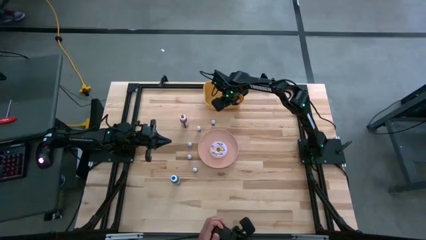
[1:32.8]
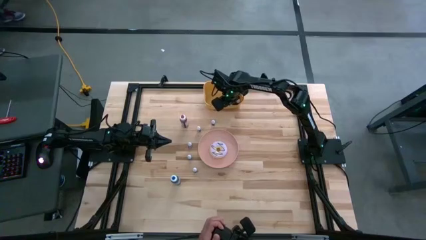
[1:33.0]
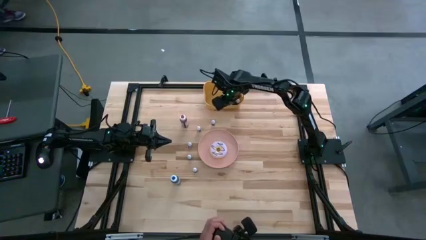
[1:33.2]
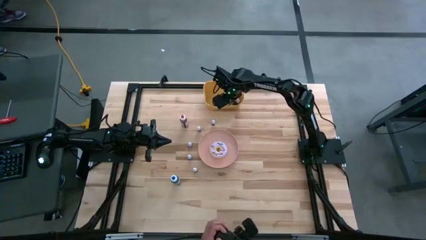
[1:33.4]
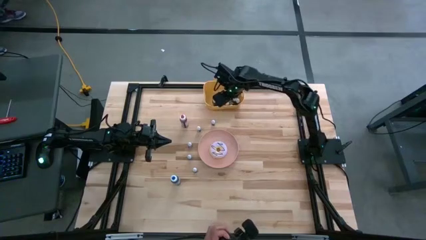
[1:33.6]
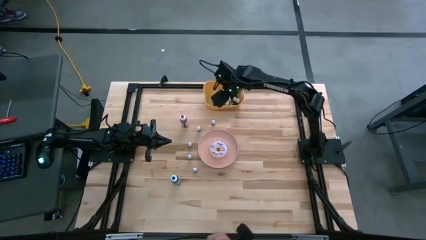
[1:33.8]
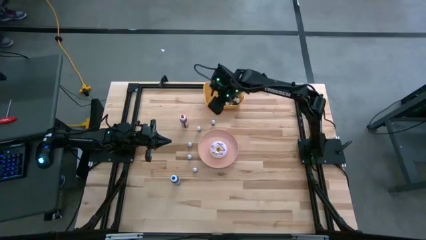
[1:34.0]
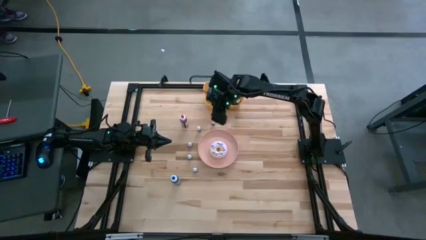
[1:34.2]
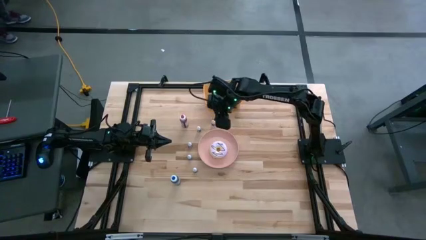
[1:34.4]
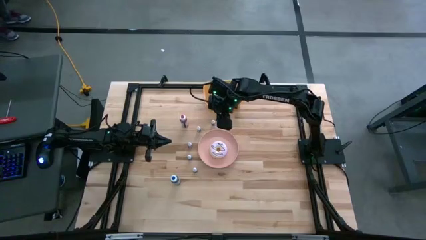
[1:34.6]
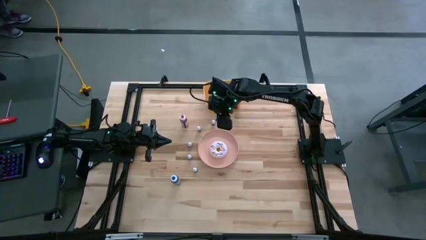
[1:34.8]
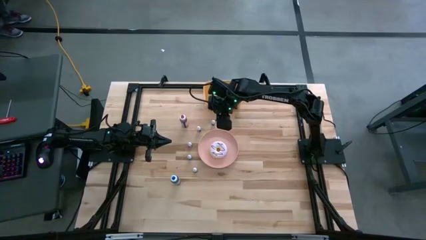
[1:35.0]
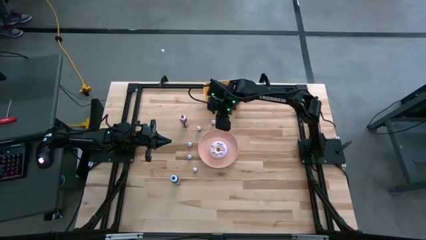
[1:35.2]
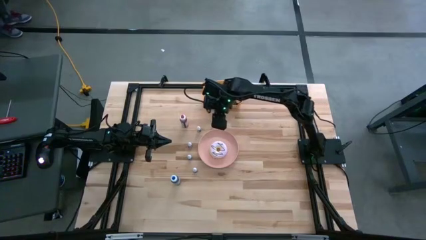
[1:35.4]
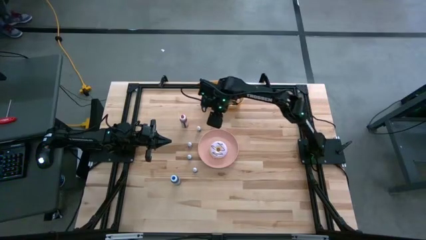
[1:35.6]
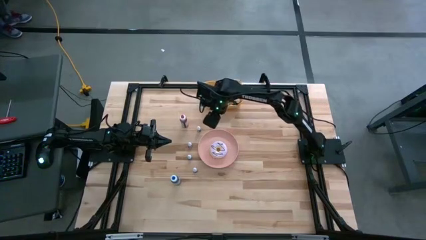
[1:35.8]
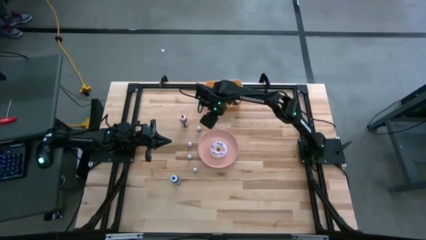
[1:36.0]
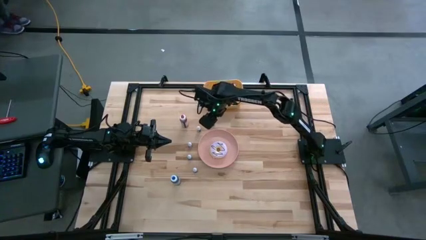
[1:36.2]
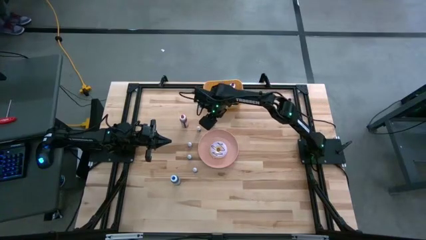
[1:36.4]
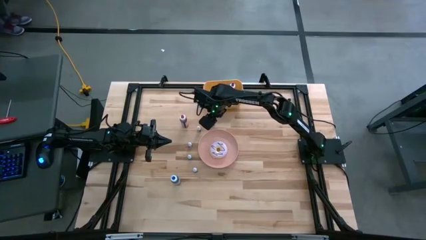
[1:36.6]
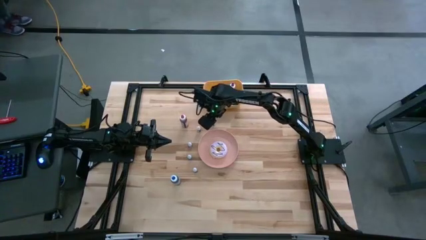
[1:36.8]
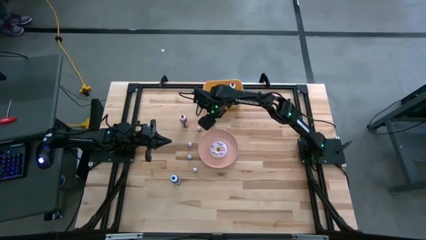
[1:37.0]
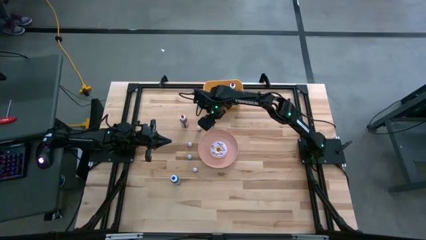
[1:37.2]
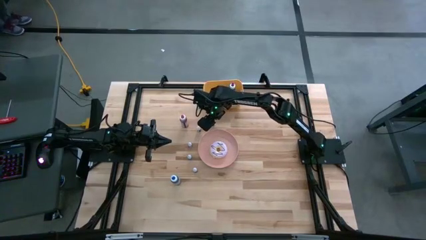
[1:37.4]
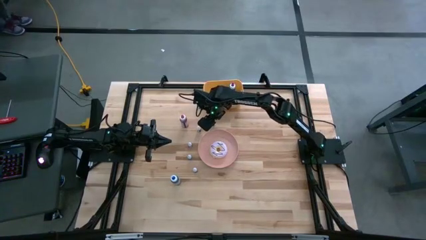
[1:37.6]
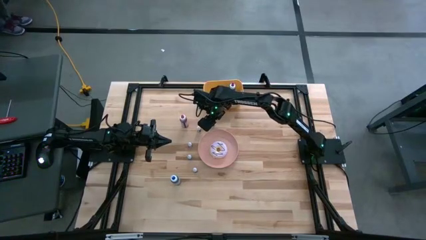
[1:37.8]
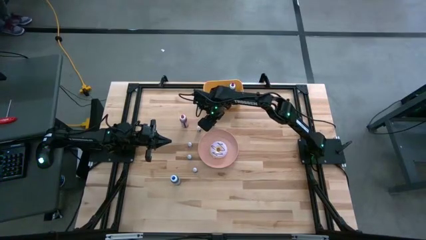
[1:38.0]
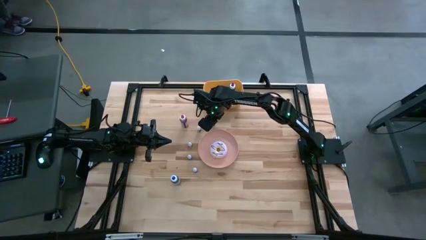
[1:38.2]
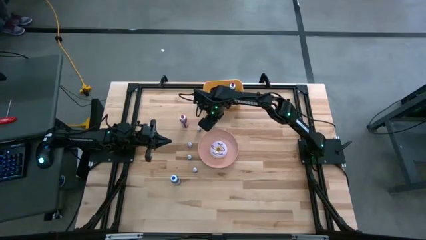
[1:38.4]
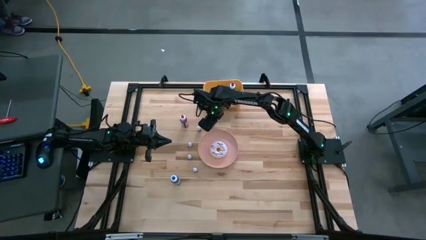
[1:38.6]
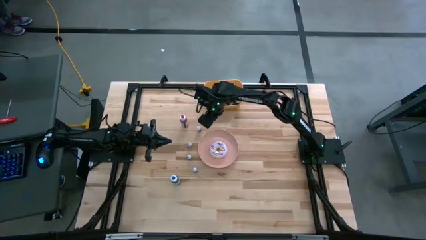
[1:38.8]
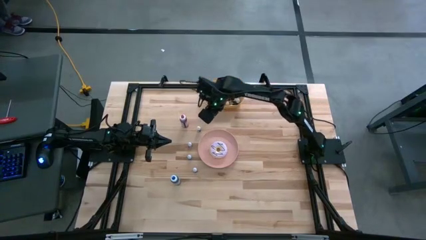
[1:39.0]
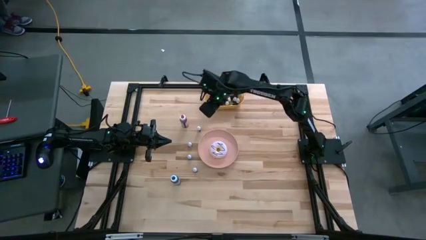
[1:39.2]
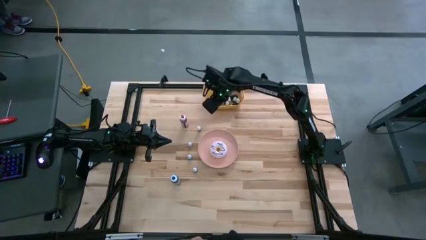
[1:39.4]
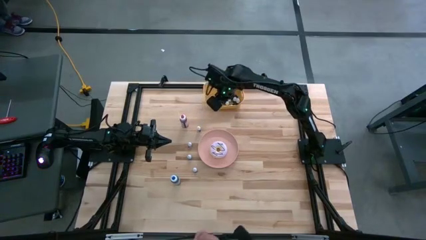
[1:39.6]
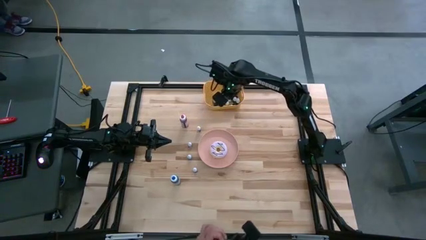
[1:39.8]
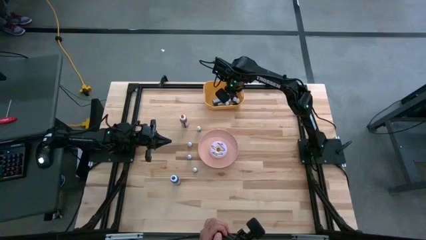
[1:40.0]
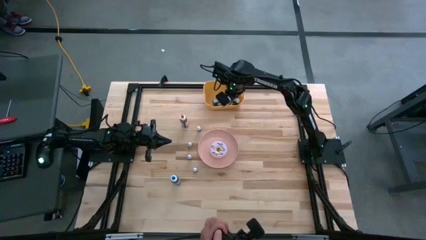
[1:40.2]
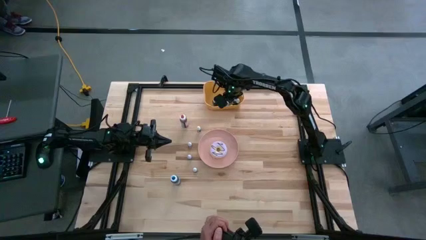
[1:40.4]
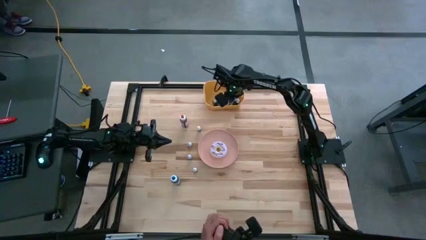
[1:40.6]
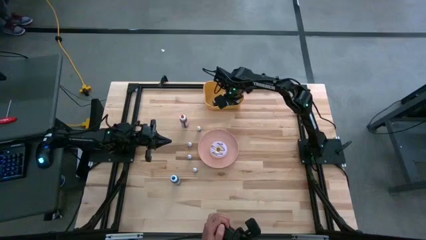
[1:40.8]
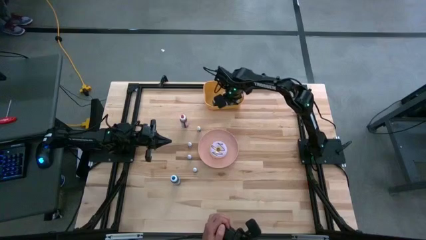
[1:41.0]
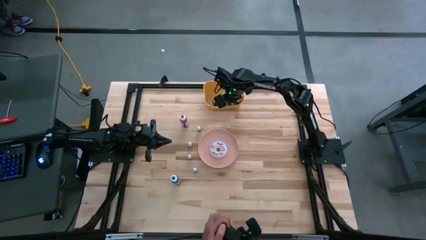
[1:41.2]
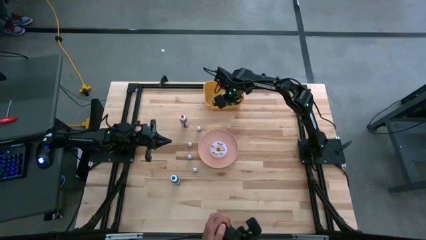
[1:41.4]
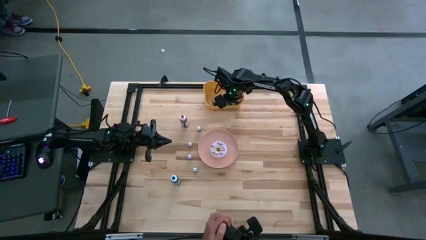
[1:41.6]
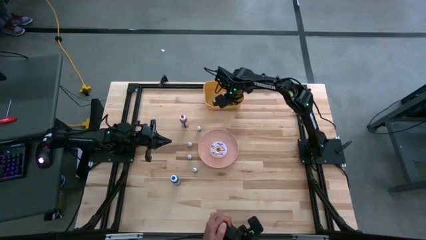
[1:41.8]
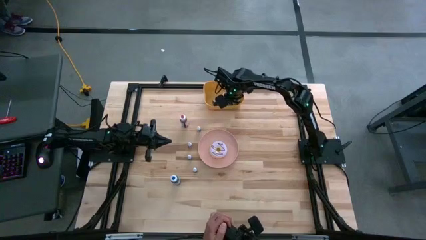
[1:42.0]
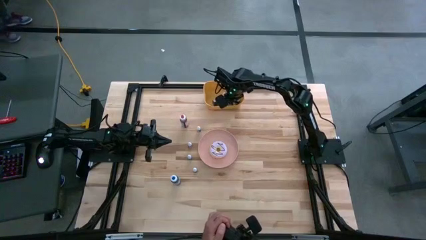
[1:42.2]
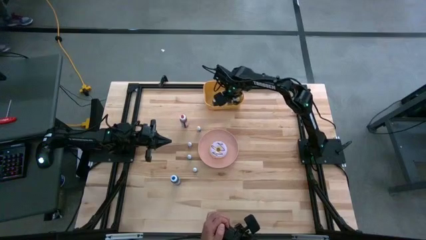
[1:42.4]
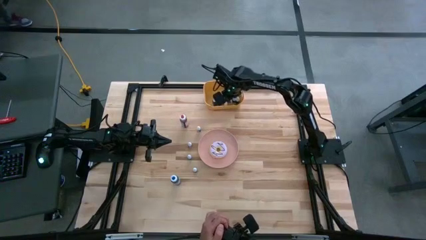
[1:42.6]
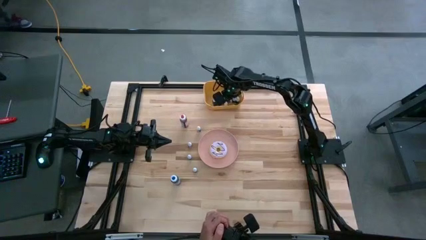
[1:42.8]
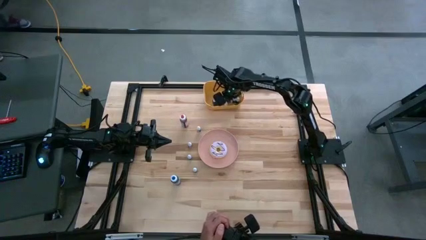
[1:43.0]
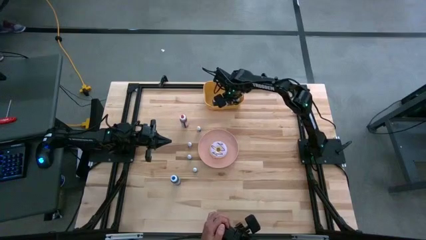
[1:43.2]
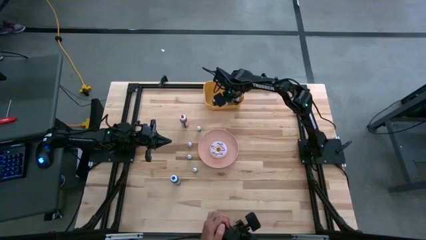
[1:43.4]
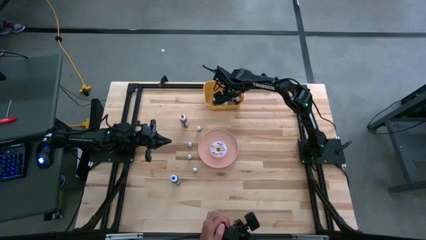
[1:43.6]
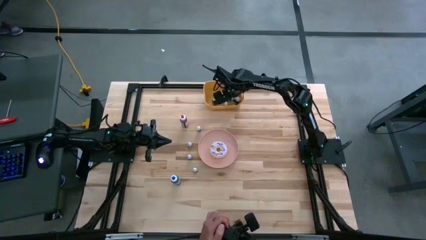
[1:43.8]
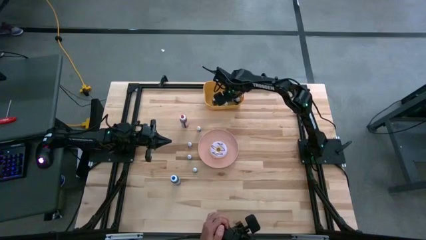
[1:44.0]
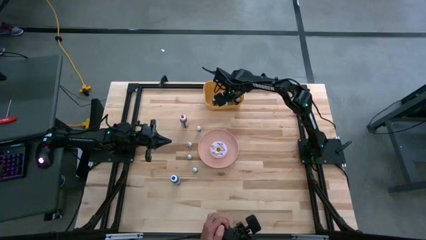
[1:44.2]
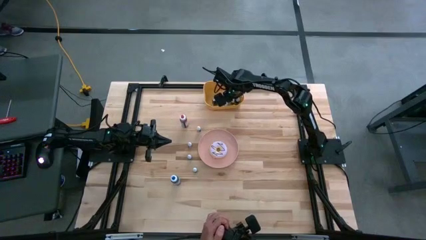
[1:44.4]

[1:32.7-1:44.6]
Task: Pick & Place food coloring
Put the small purple food coloring bottle into the orange bin

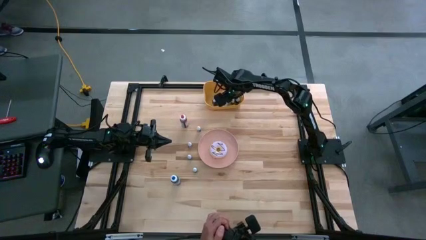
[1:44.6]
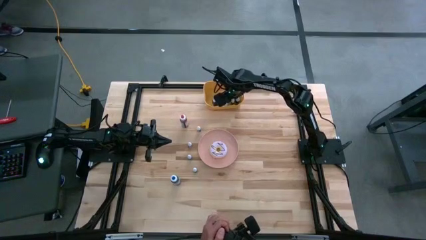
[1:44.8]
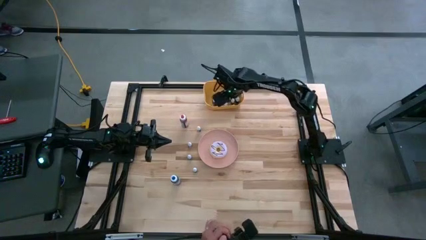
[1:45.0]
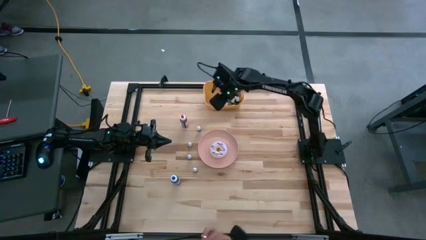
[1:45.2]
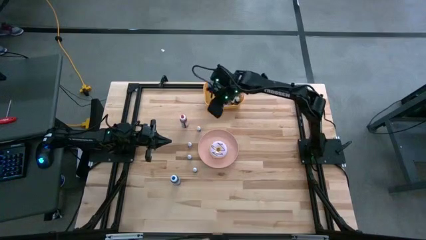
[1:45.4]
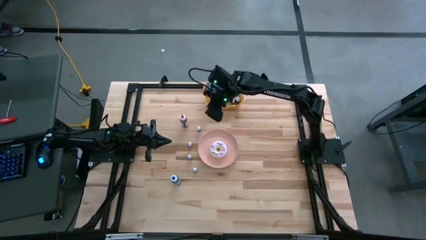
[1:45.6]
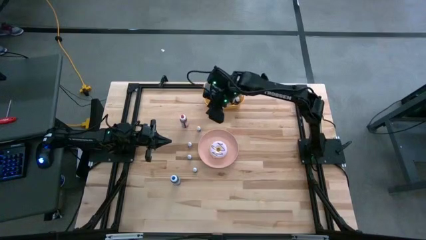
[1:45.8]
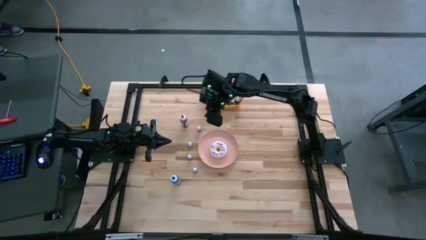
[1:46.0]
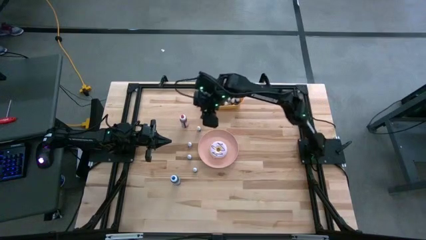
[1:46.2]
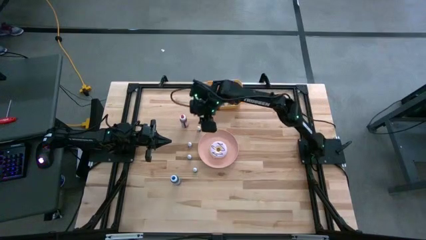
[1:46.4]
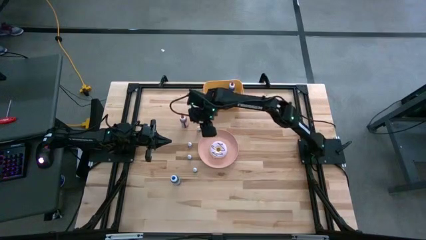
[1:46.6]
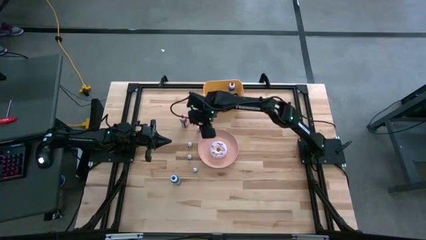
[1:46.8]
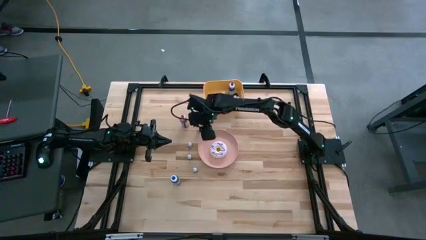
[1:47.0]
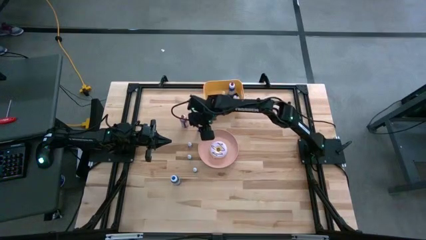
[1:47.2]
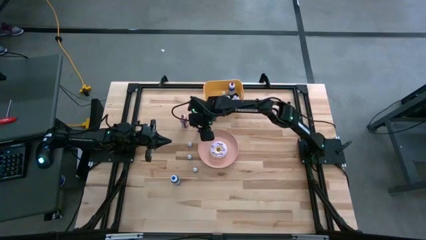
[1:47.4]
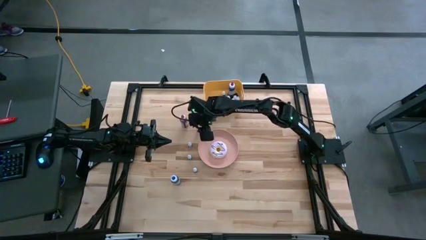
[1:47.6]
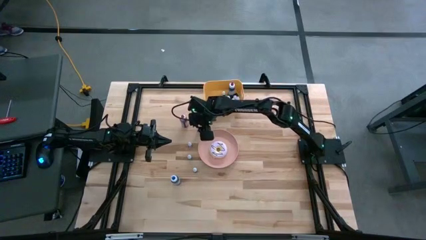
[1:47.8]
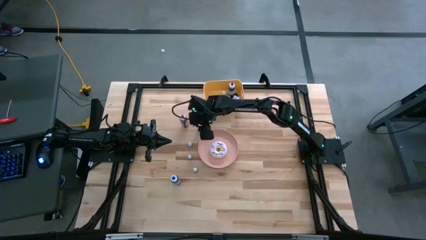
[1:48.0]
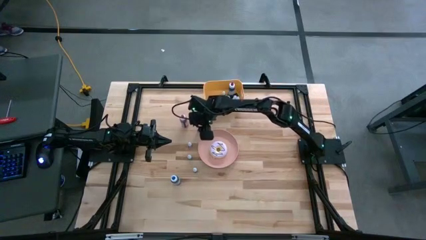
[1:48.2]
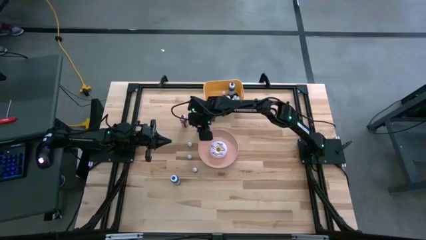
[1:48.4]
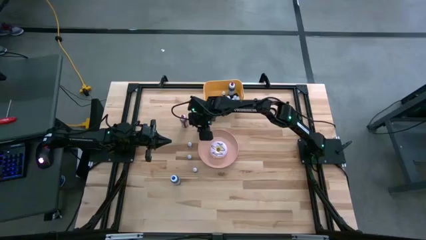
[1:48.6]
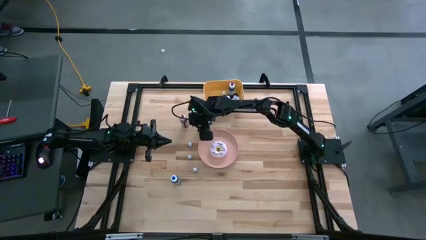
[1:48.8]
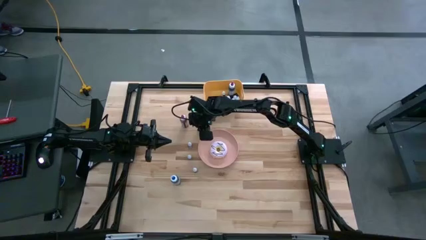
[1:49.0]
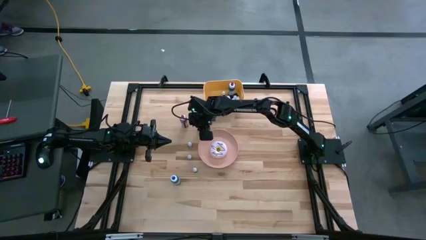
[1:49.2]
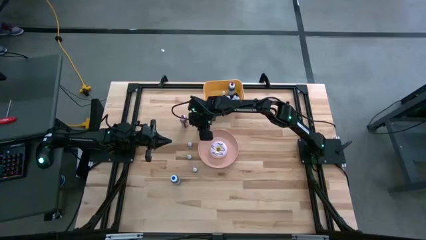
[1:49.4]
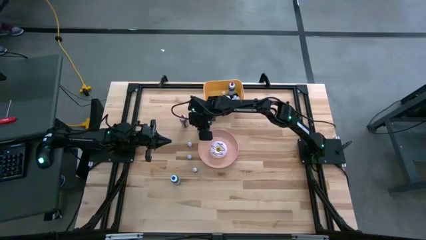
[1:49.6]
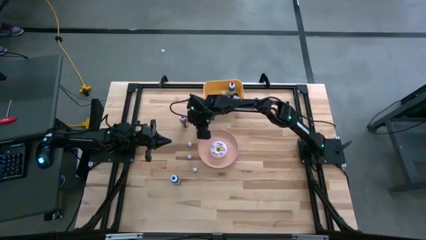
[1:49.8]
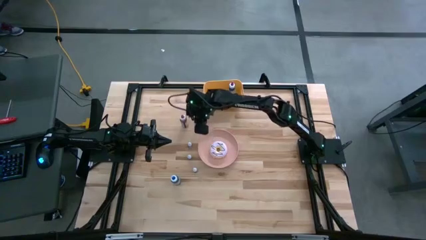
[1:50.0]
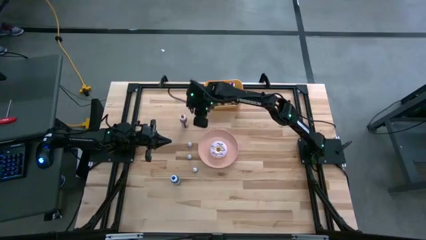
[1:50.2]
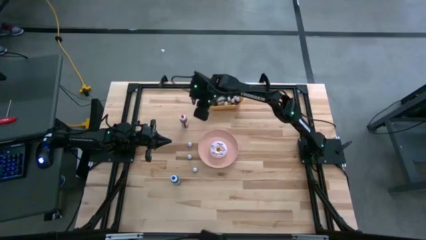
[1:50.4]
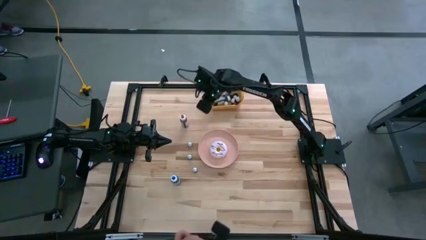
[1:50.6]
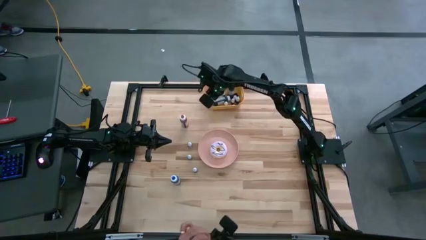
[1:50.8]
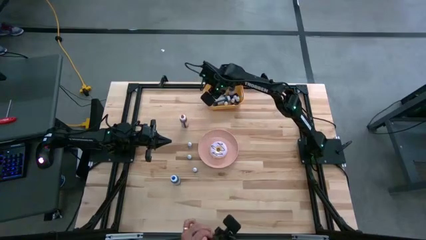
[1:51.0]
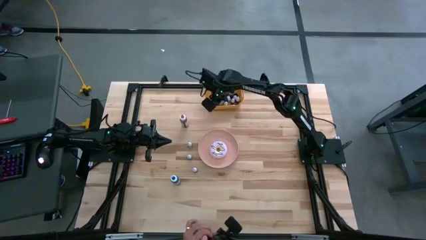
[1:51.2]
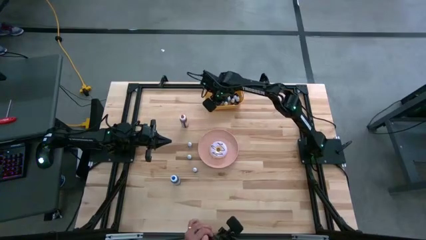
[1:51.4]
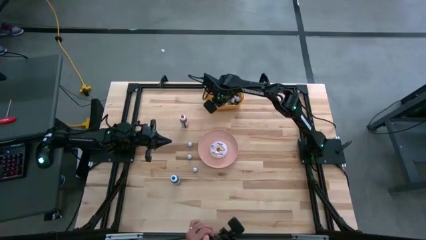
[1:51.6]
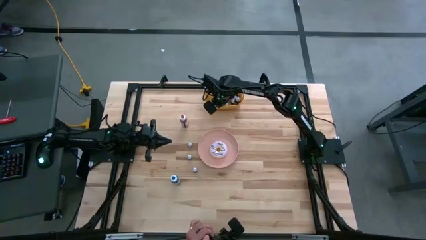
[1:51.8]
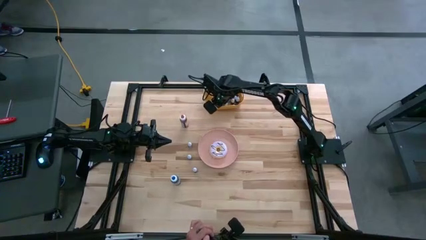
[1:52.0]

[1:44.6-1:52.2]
Put the small orange food coloring bottle into the orange bin
